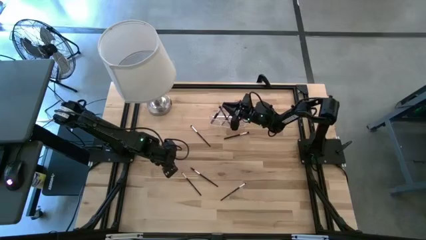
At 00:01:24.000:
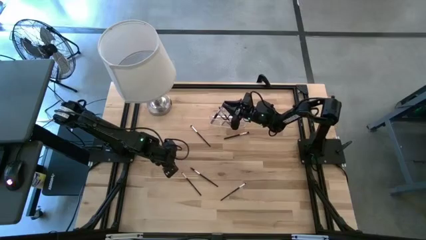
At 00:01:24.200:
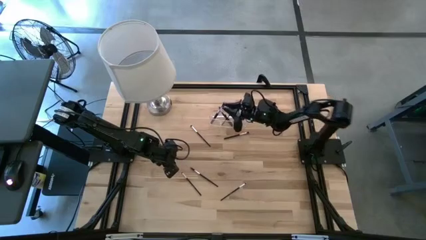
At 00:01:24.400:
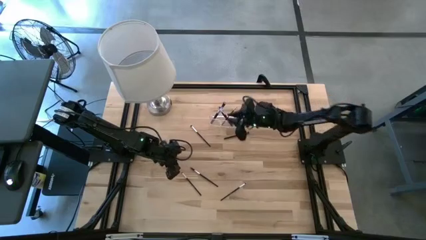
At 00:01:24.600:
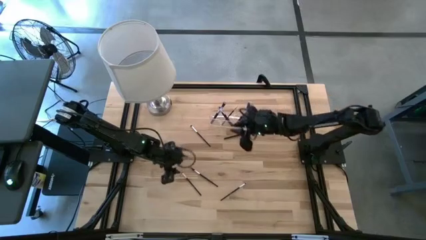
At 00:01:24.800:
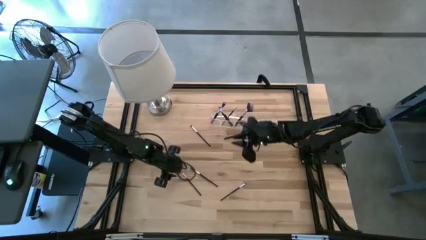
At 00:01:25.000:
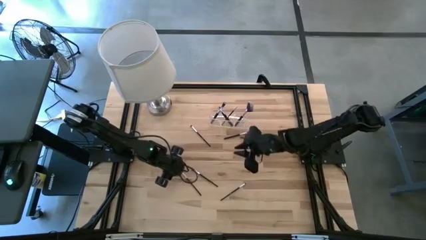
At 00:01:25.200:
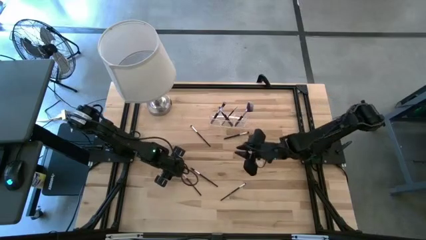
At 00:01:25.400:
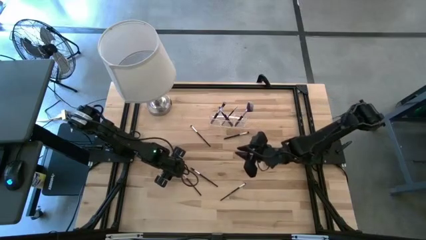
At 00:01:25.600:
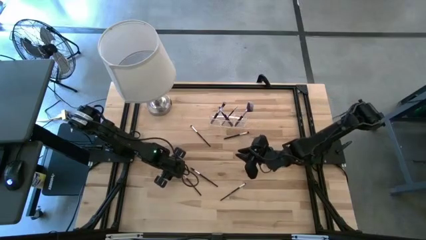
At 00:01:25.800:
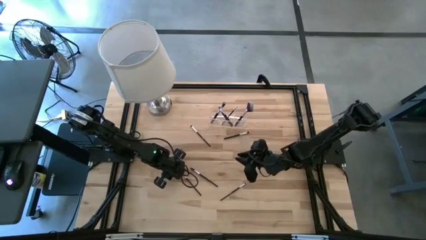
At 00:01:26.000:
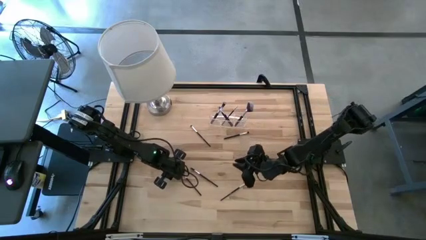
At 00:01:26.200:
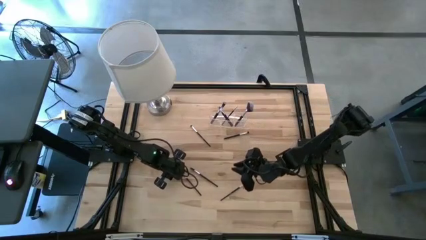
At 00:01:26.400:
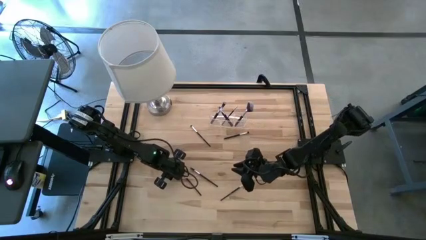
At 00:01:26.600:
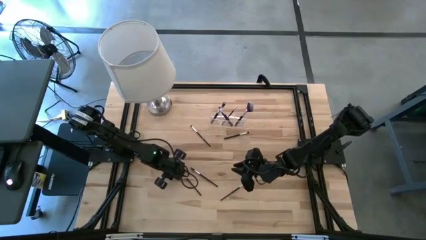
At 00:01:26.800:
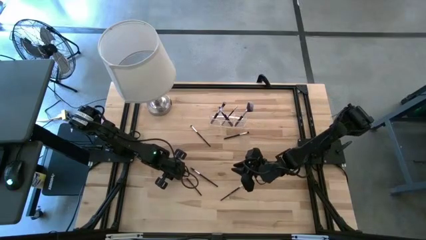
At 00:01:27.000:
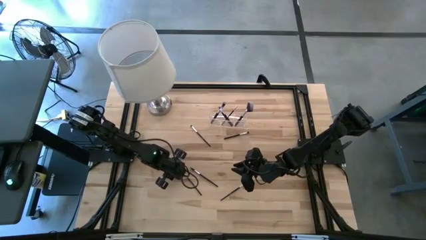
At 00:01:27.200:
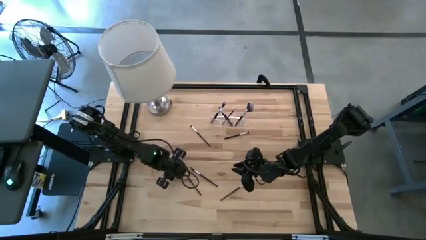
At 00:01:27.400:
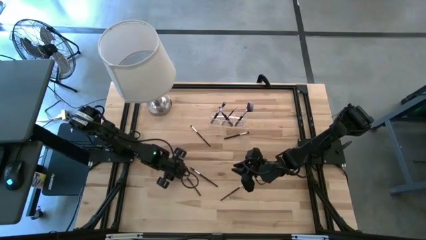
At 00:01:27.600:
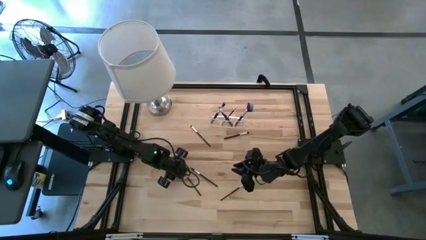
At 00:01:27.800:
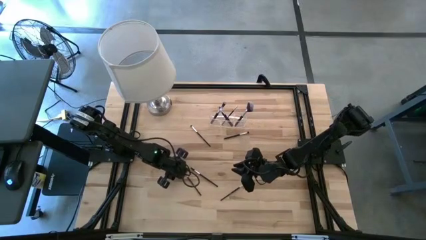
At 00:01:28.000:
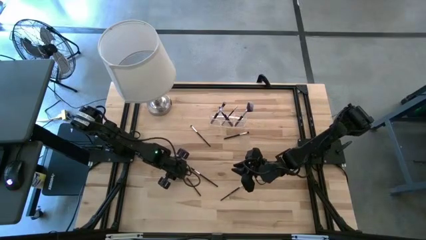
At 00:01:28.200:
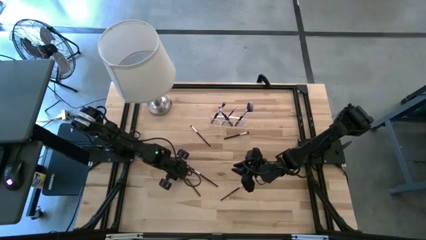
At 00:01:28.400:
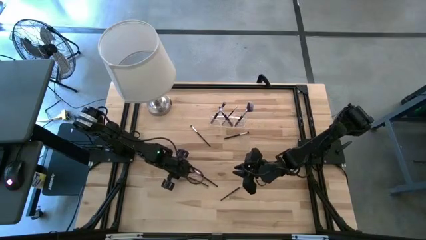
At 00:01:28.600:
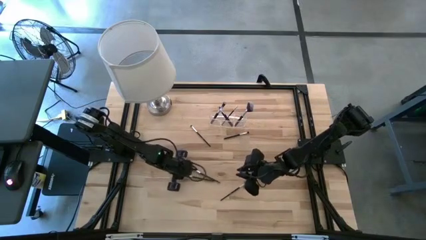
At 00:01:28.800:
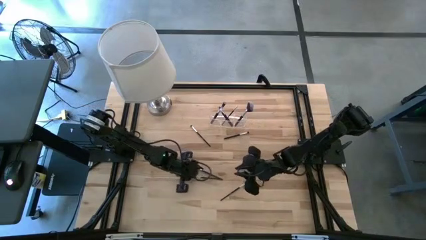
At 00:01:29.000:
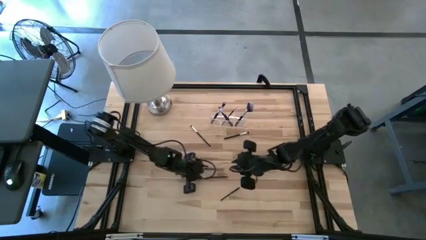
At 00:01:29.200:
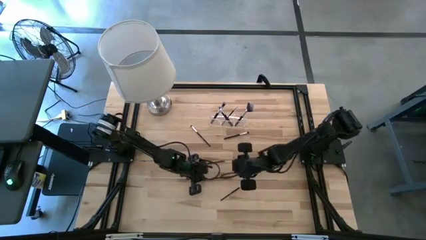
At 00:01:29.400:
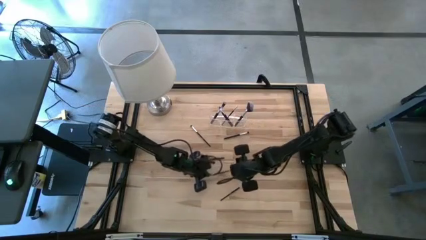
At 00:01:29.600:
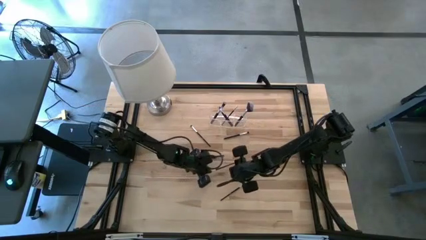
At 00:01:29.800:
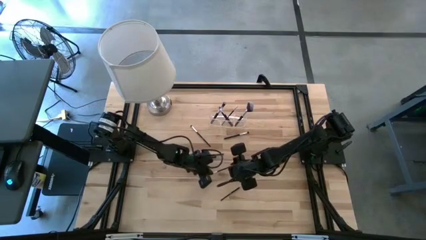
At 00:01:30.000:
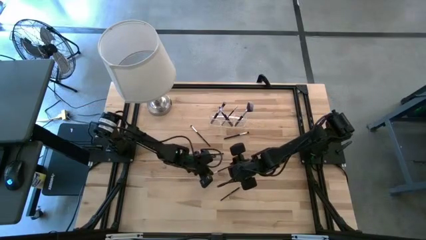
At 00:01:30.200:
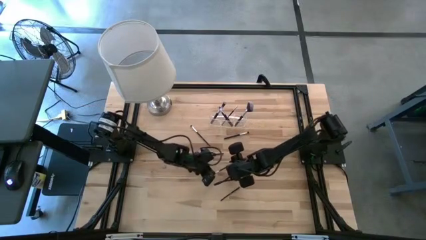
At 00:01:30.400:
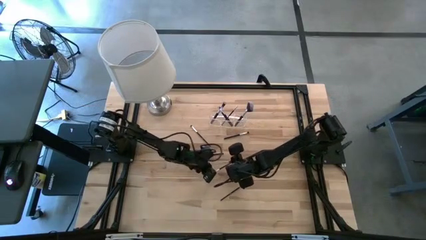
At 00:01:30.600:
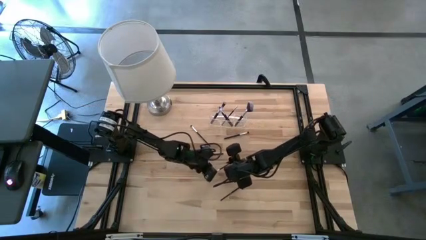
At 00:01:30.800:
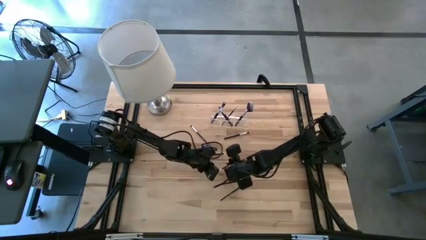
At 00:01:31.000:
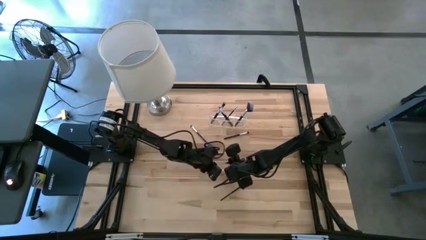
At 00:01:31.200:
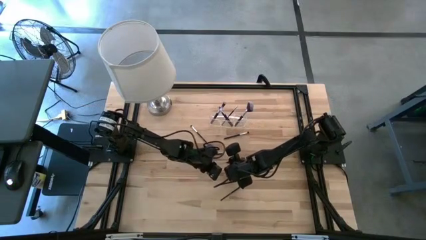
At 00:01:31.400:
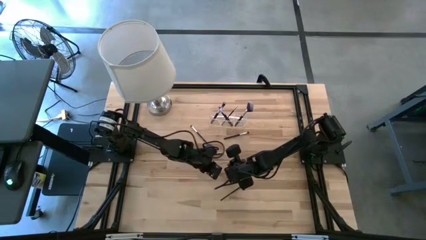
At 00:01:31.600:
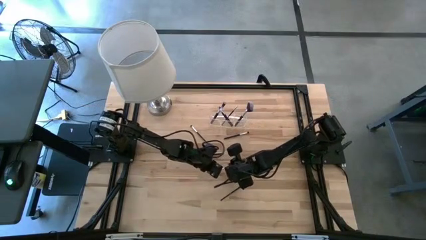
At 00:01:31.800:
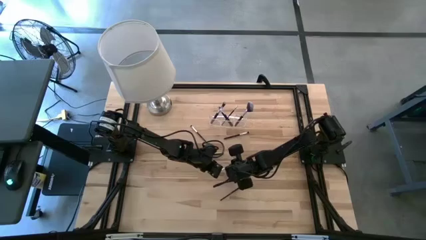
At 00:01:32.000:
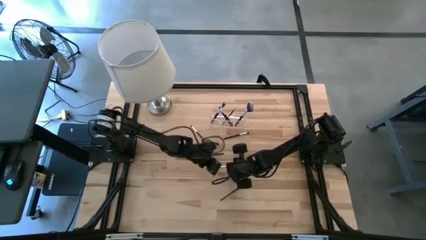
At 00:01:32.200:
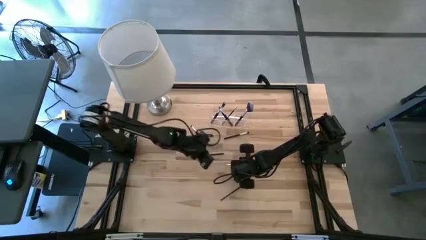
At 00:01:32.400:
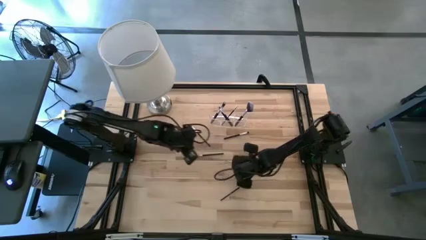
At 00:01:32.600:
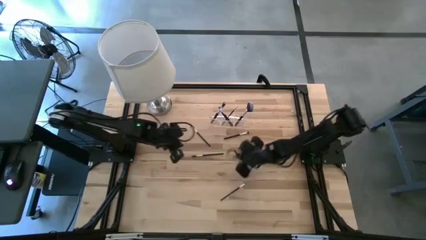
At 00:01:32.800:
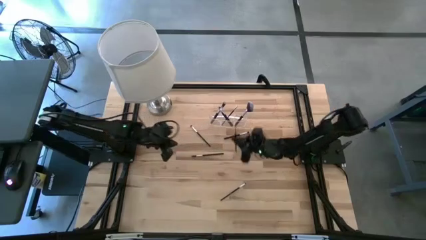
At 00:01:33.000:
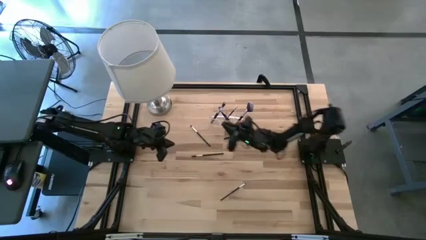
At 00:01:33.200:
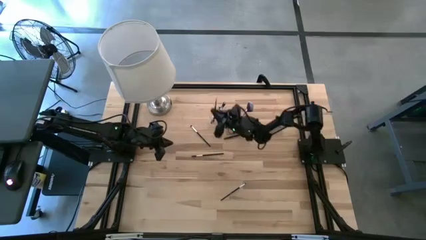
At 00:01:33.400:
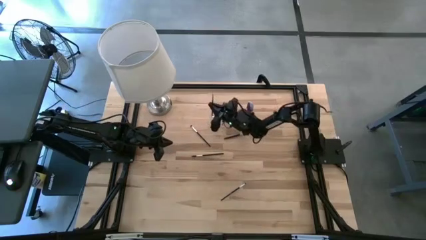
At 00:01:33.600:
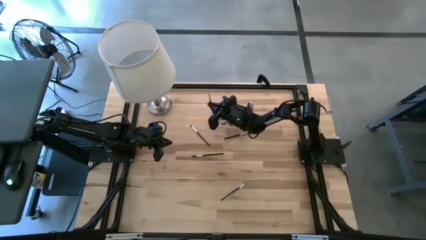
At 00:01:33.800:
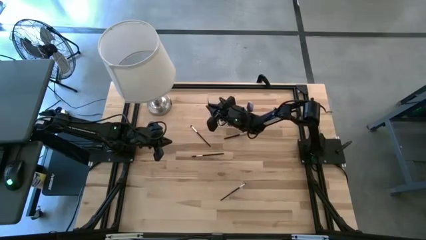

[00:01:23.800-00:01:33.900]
Task: Put items in baskets/containers
Put the eyeshadow brush into the transparent organizer

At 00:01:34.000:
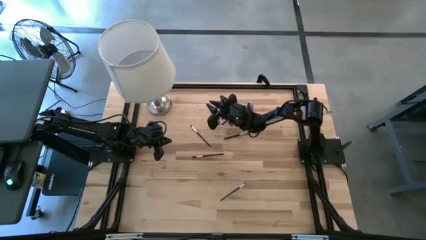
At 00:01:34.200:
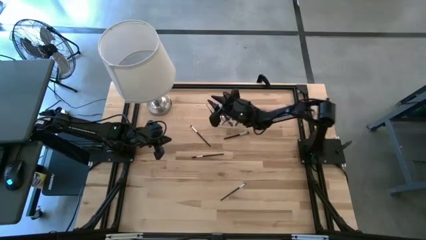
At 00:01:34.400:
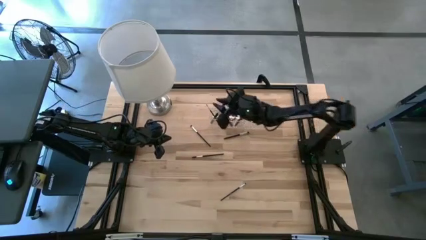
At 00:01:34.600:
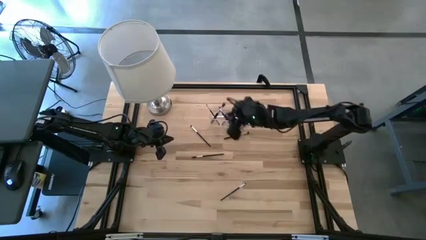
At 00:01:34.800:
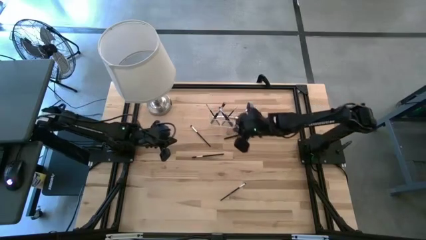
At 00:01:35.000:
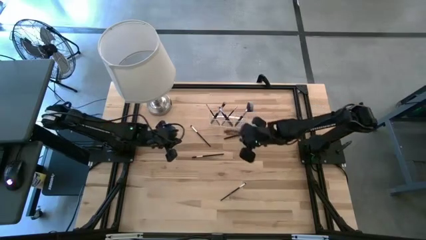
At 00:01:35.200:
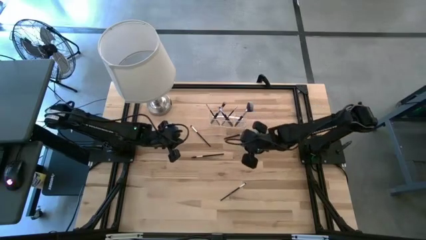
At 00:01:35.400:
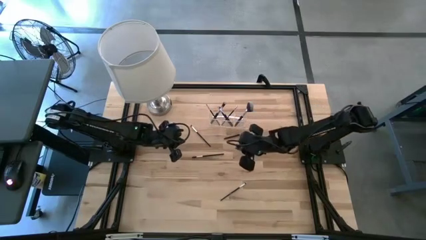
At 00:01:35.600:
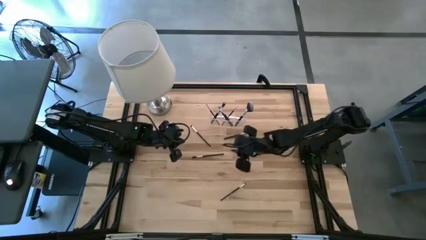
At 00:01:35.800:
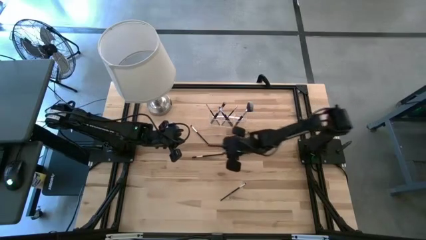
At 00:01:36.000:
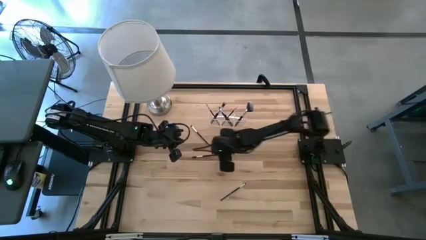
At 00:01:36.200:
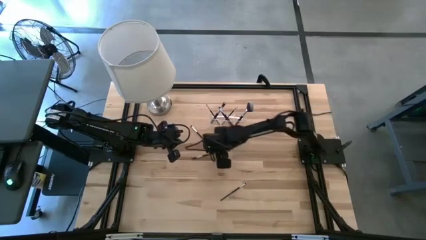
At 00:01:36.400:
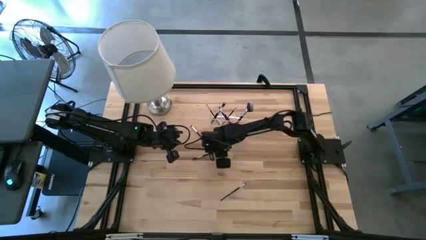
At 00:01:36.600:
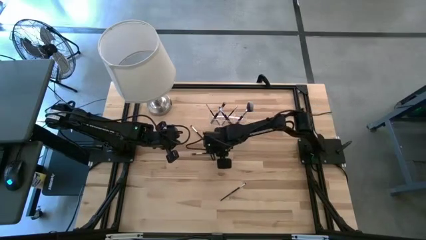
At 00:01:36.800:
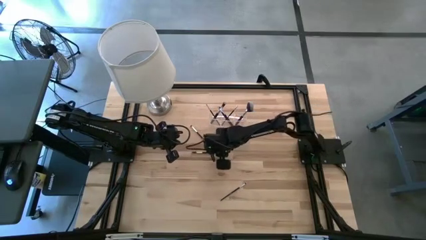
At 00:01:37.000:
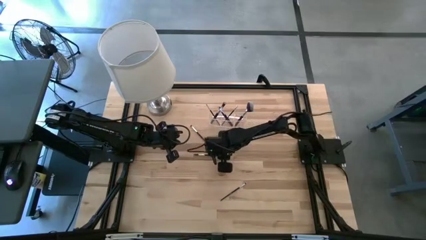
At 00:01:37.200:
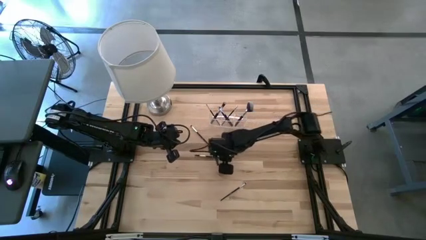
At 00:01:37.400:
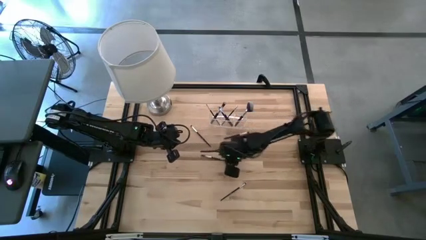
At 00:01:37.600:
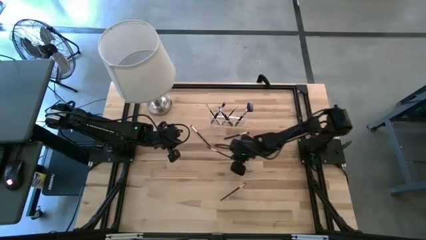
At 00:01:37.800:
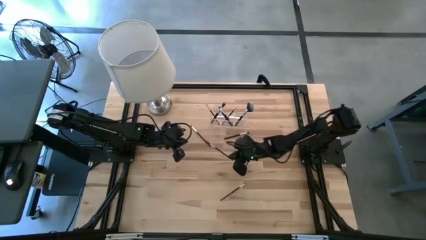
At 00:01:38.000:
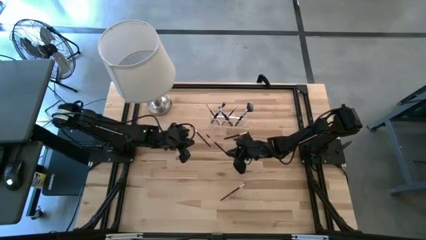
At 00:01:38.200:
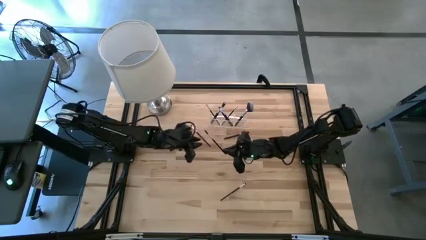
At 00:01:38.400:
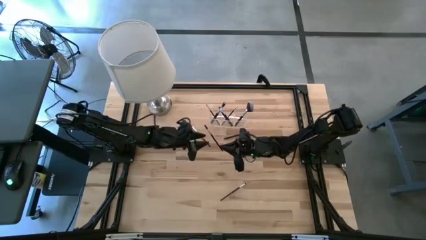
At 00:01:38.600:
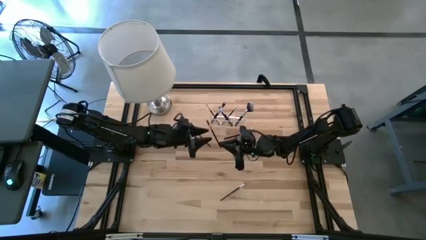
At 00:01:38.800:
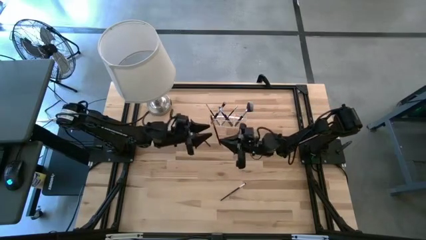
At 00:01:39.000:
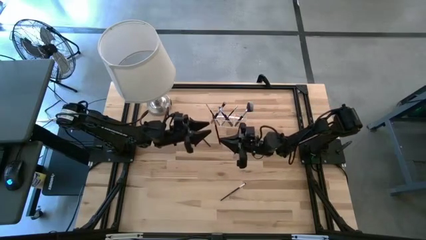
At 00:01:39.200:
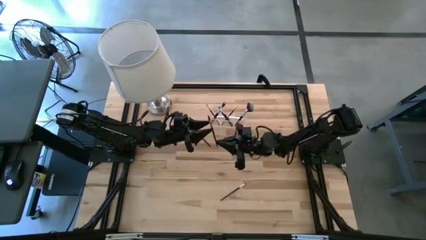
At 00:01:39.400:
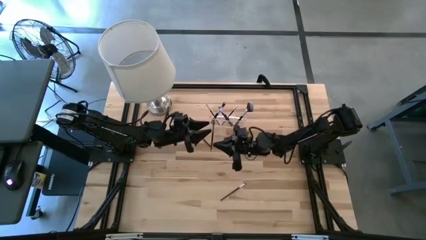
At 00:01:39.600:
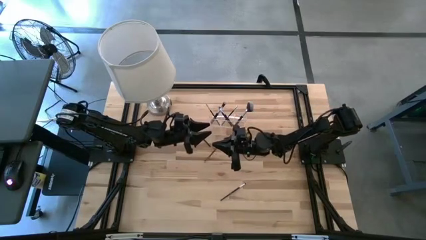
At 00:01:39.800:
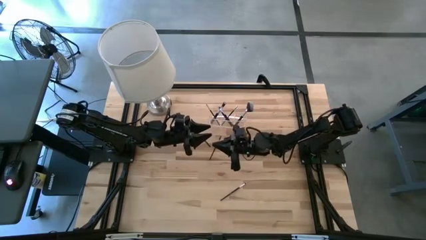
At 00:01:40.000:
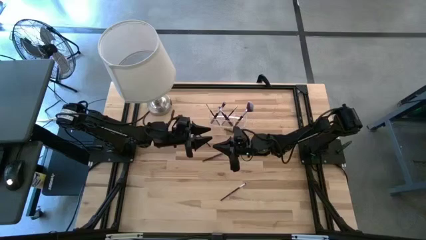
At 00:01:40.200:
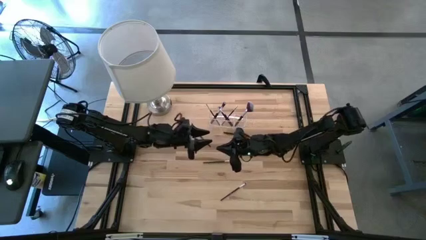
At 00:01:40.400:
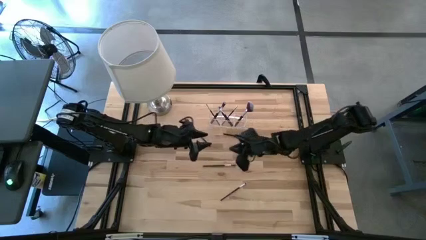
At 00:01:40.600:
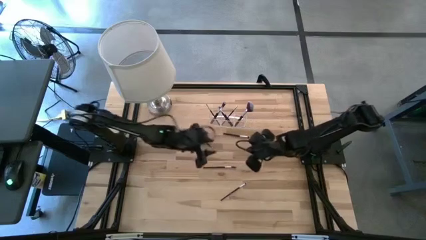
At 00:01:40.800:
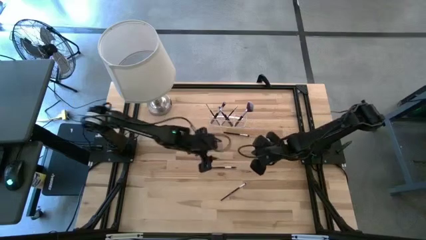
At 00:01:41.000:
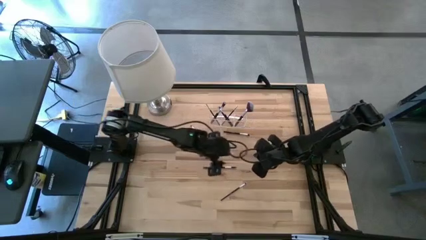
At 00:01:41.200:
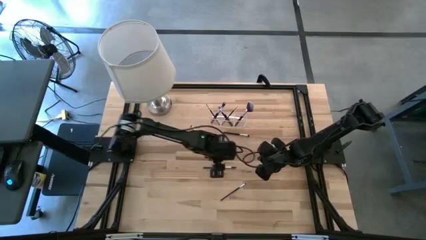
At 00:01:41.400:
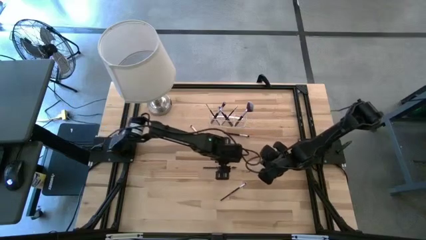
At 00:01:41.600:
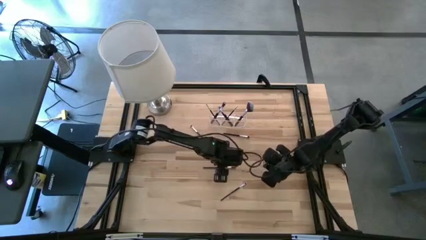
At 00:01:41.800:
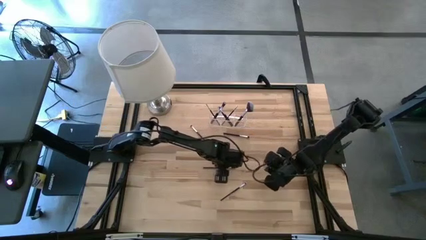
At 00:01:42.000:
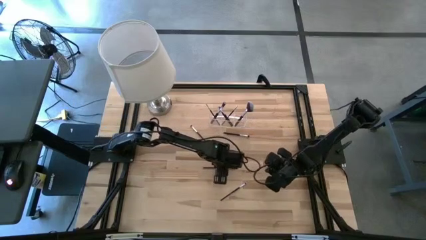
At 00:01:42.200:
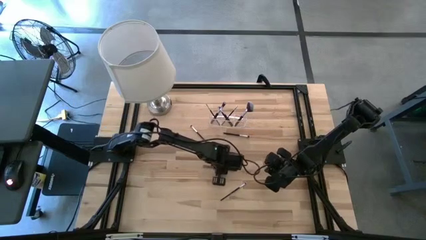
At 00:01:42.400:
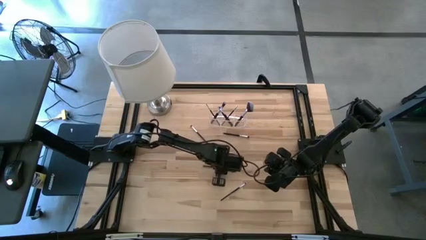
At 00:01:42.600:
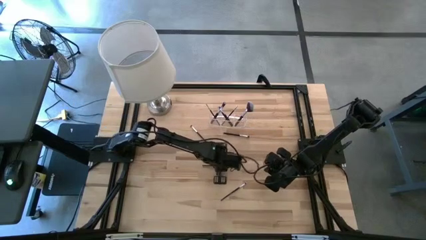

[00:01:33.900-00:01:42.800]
Put the lash brush into the transparent organizer
